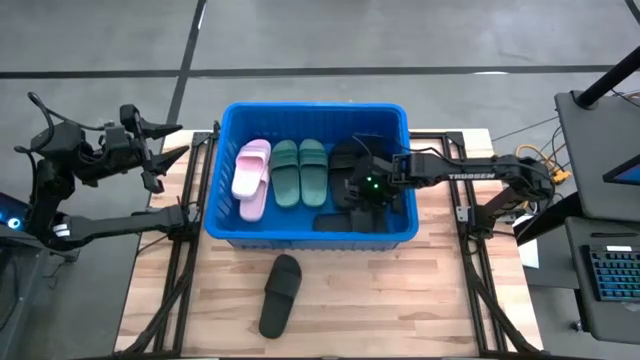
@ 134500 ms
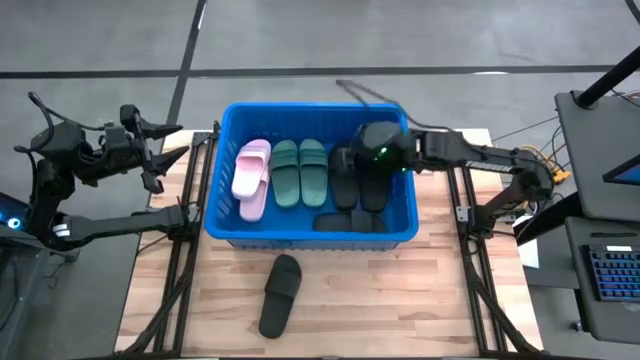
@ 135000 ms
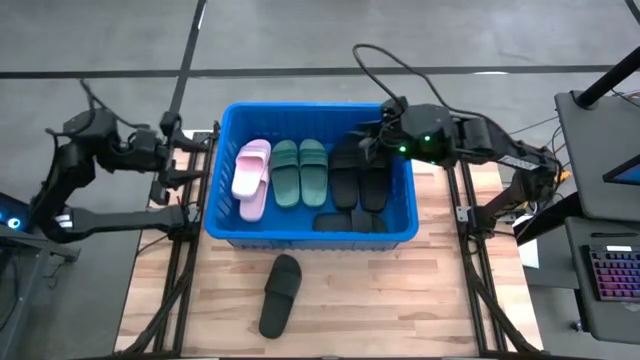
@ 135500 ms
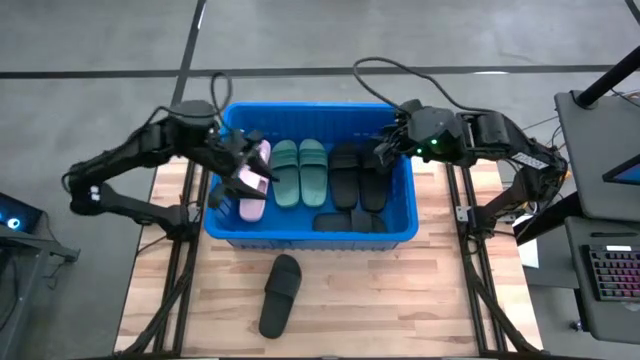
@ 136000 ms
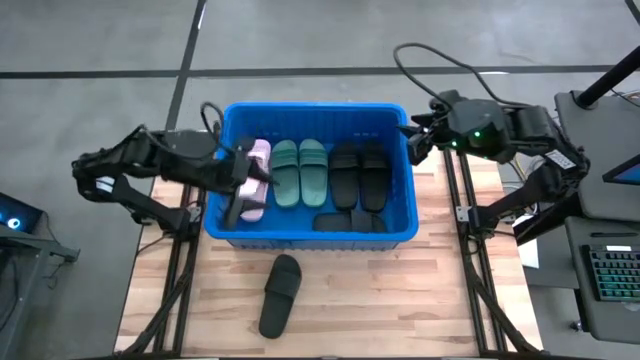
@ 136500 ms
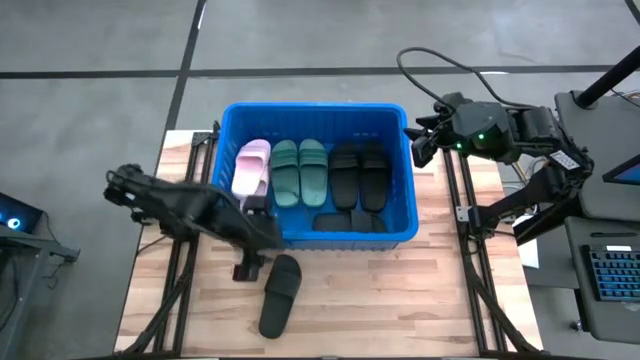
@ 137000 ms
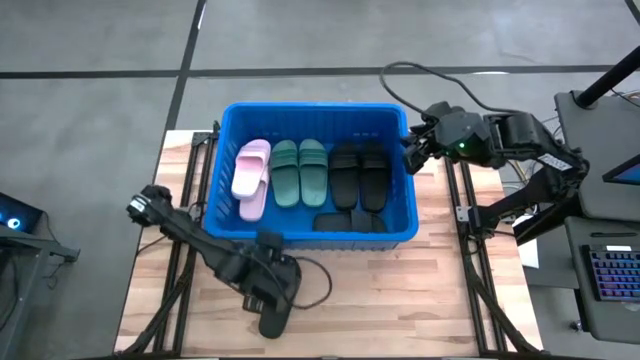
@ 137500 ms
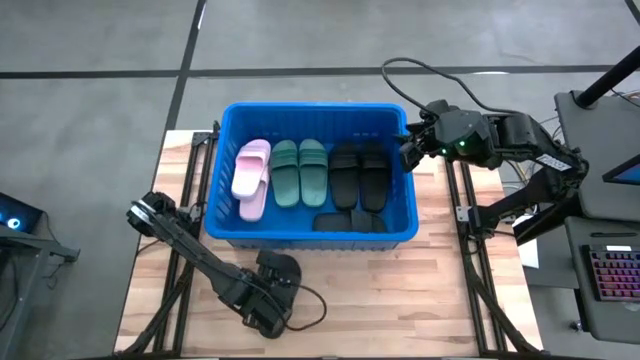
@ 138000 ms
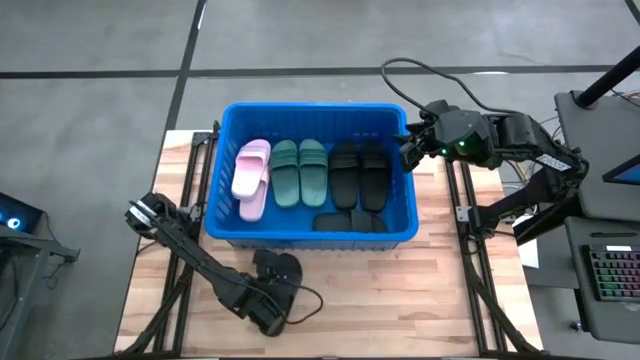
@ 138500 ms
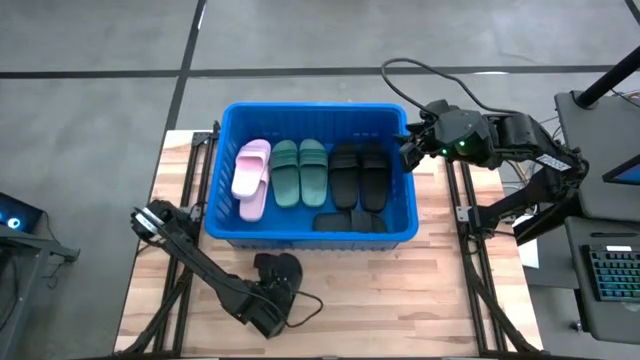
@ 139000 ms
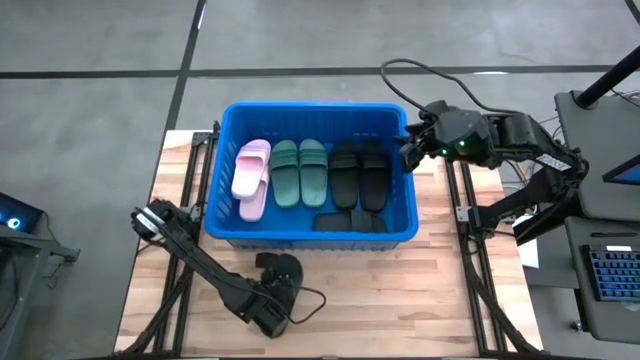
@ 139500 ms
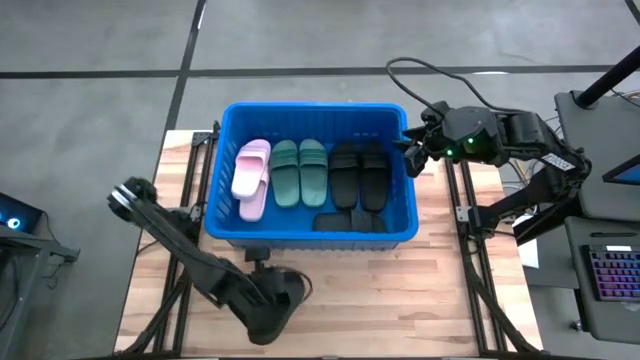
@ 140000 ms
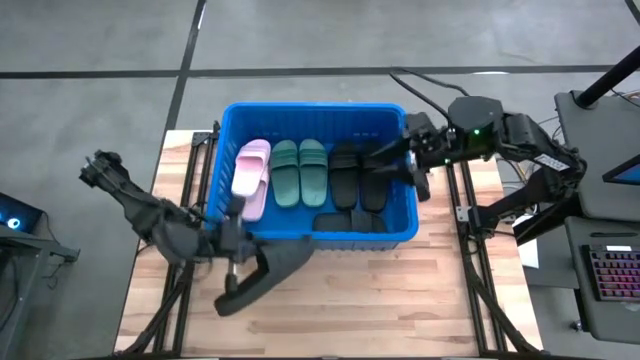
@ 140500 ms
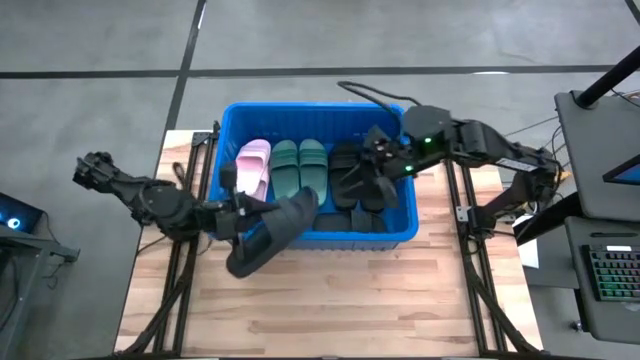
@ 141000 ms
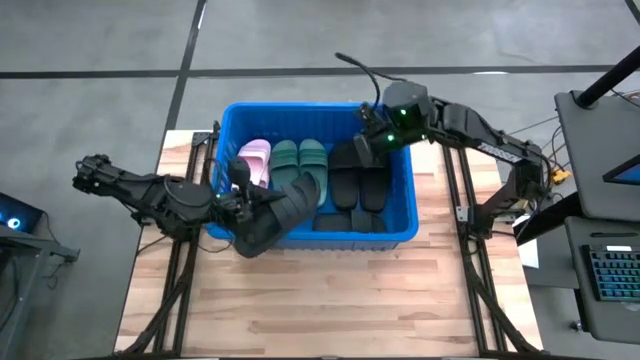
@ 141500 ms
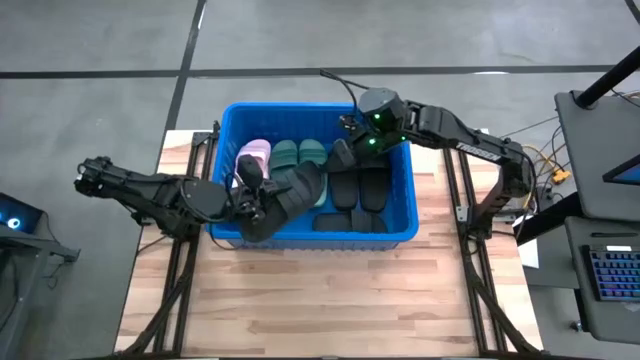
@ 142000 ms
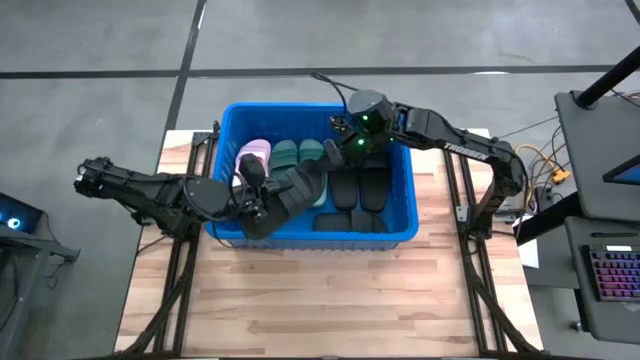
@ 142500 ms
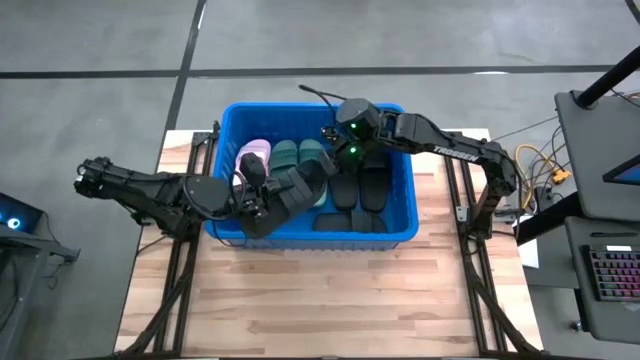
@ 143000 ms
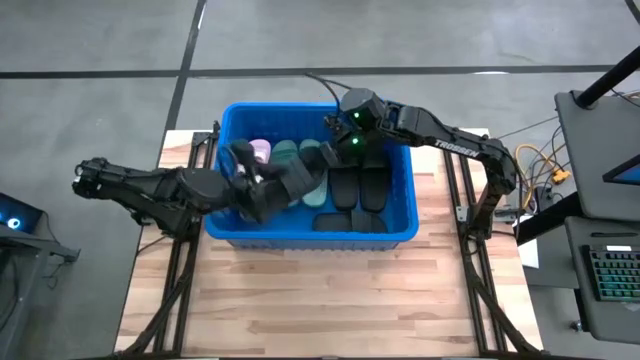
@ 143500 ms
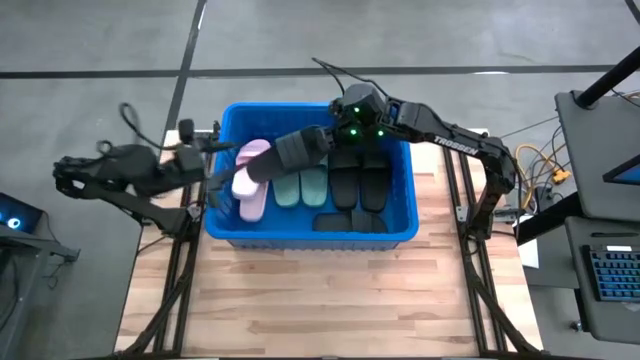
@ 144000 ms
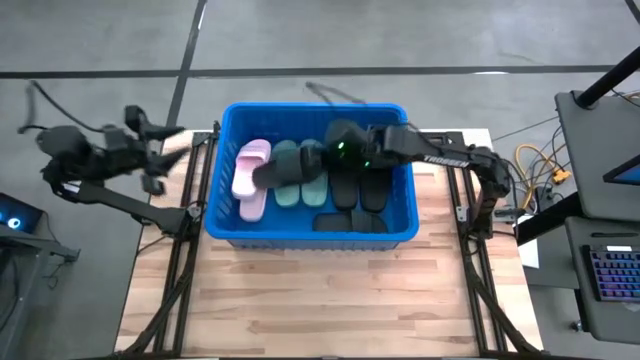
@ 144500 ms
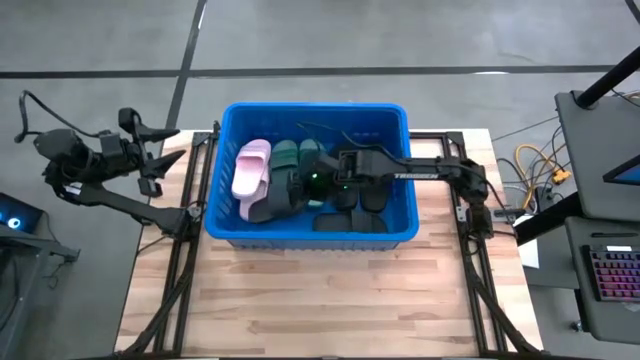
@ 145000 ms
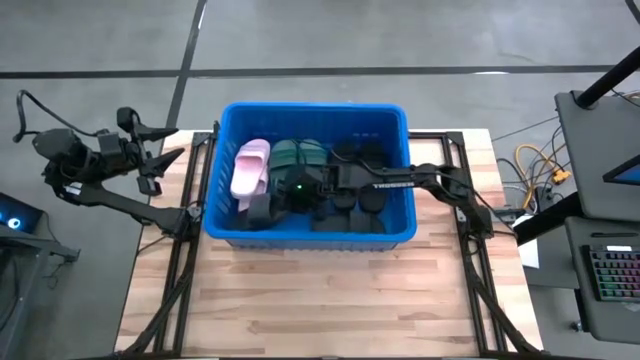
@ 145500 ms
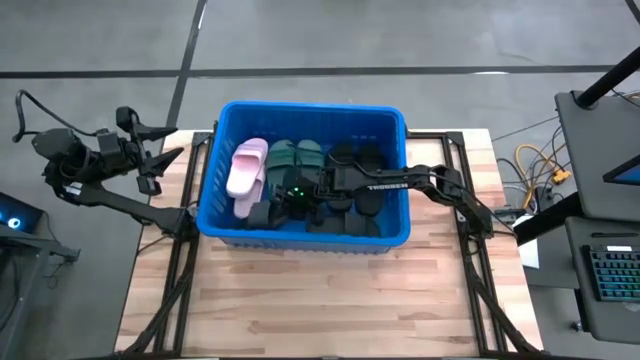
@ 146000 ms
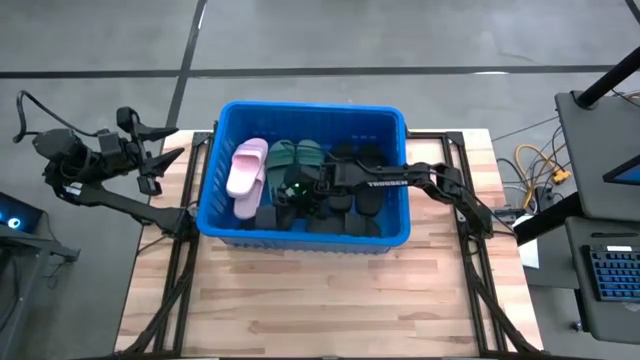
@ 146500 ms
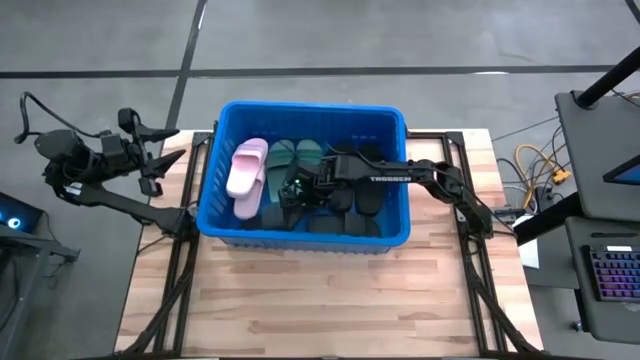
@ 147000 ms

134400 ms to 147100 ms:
Task: Pick and place slides into bin
Put the black slide into the blue container

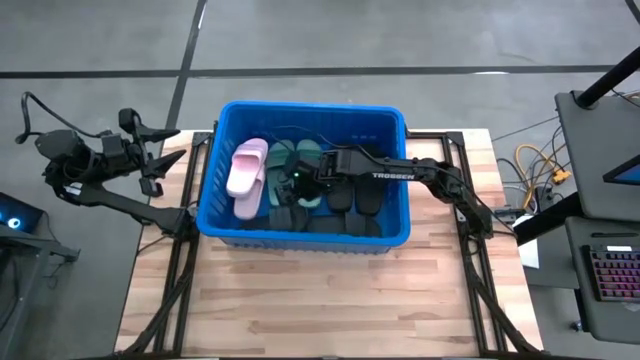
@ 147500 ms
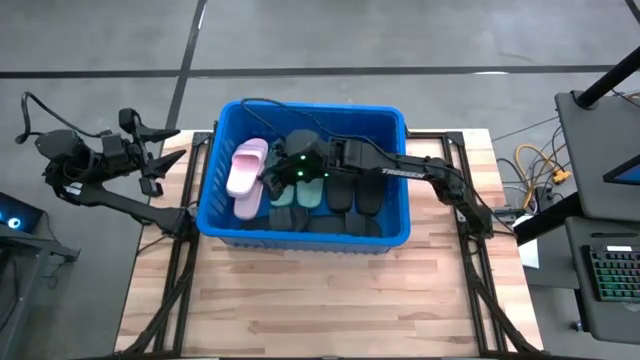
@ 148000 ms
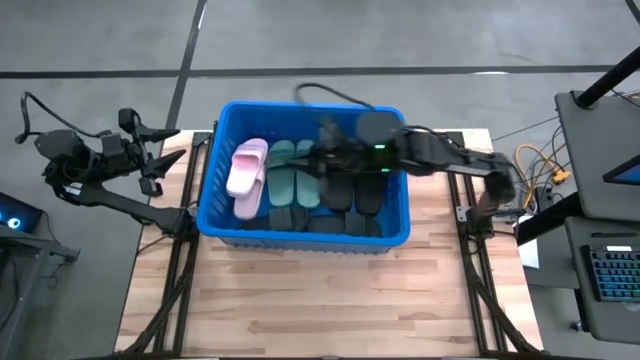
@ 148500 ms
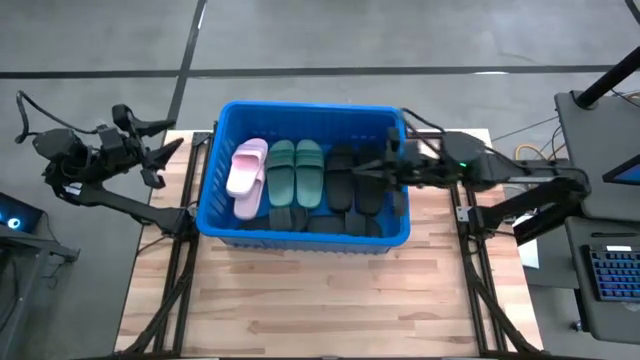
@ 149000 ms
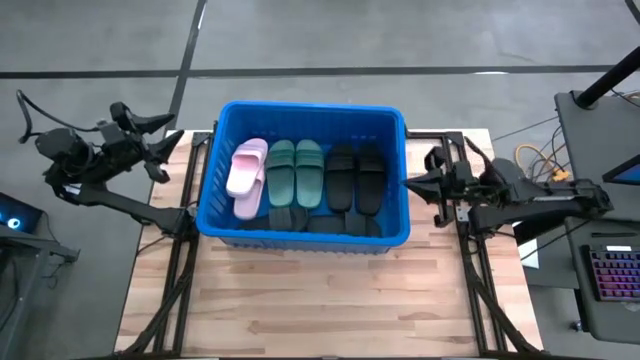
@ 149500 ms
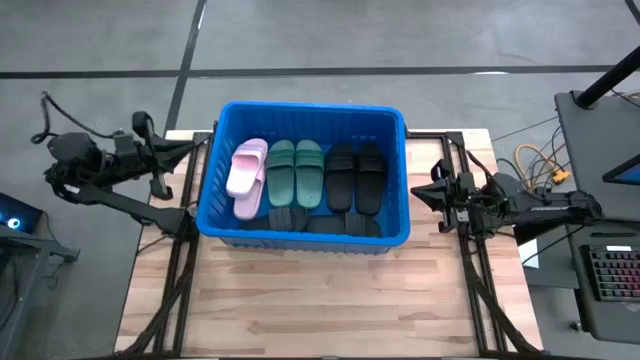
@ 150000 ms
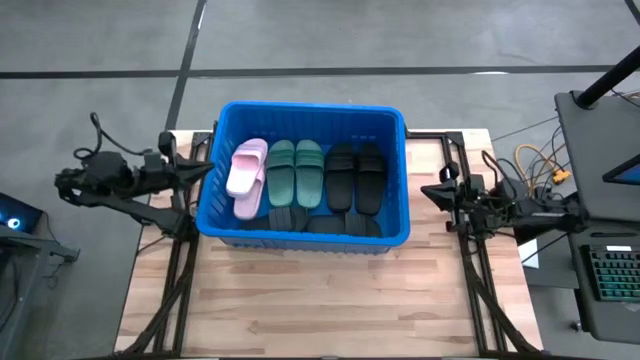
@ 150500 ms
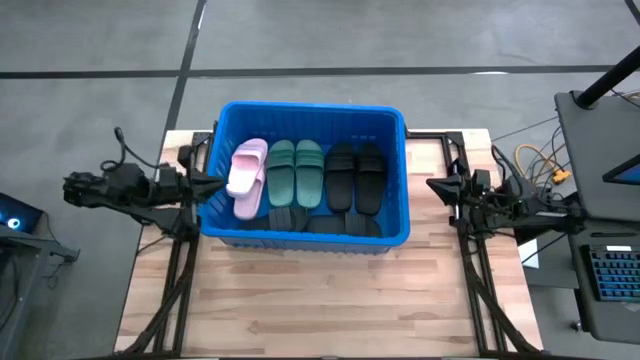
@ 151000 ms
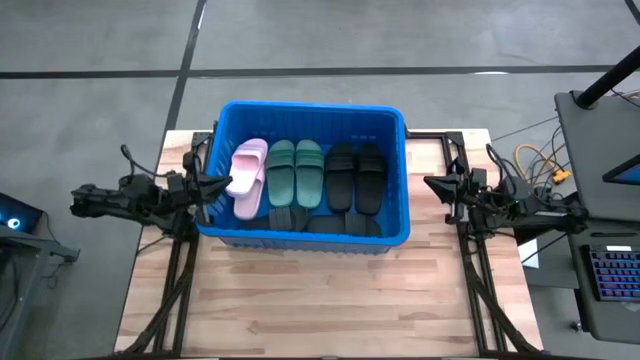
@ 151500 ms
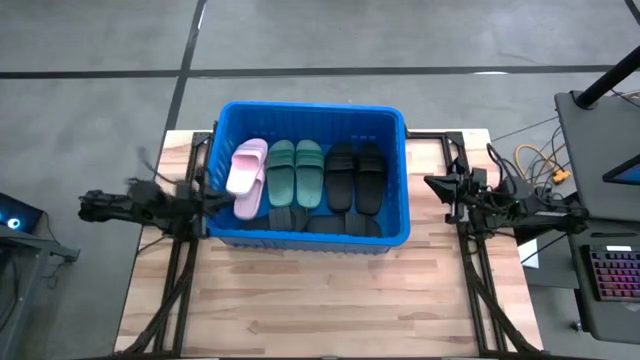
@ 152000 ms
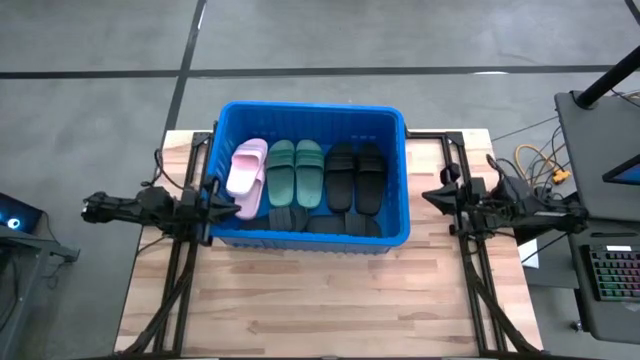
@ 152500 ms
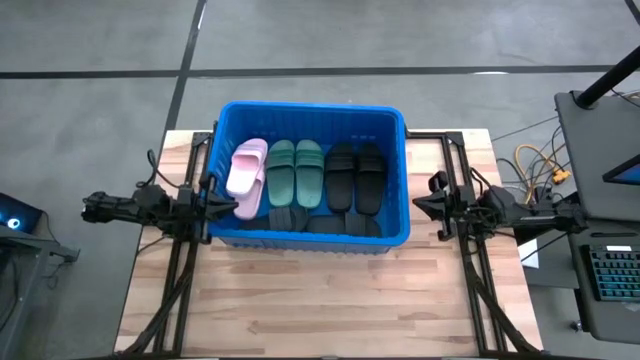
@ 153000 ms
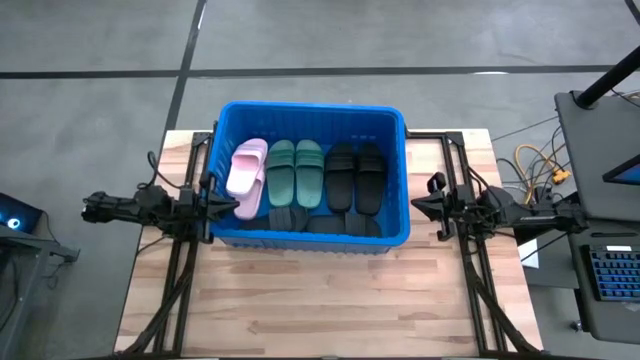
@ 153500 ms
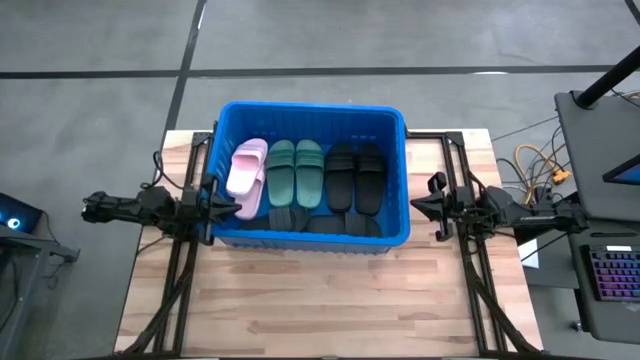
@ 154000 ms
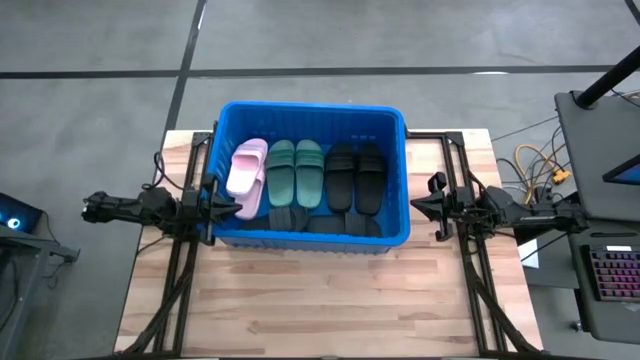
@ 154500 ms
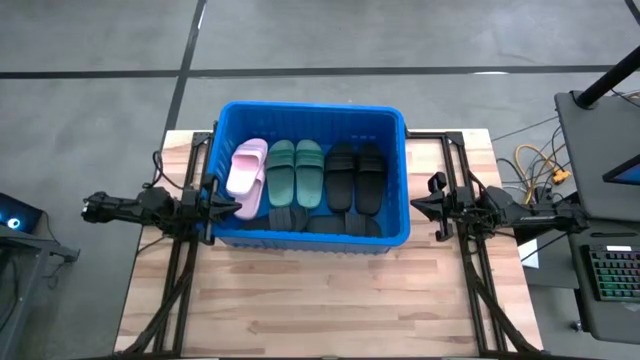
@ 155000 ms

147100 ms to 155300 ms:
Return to Home Position
